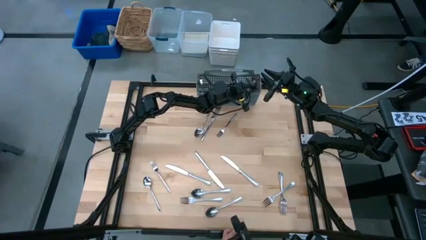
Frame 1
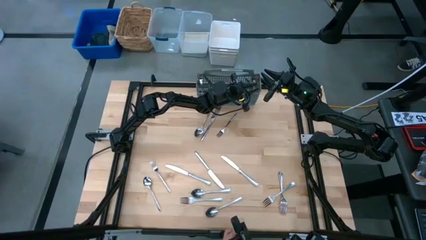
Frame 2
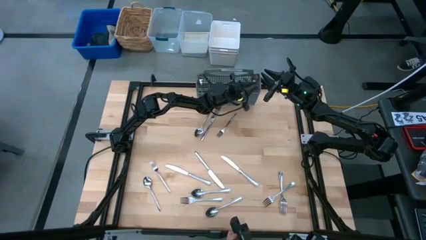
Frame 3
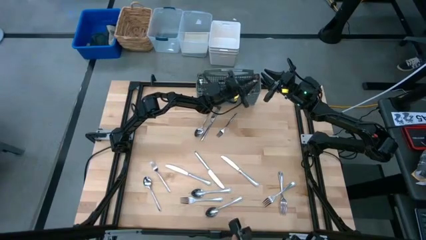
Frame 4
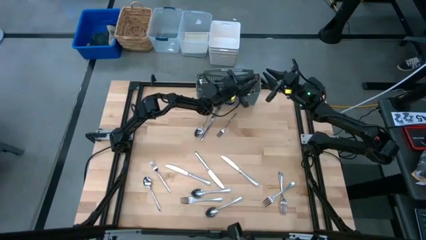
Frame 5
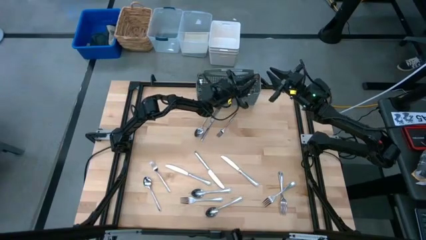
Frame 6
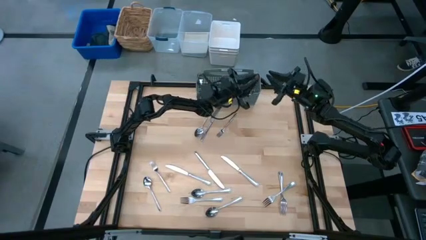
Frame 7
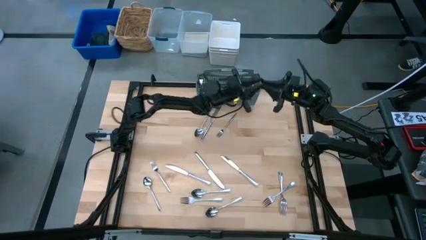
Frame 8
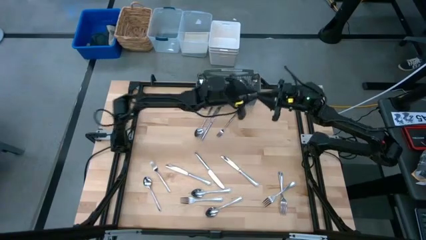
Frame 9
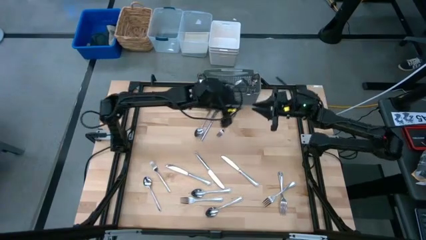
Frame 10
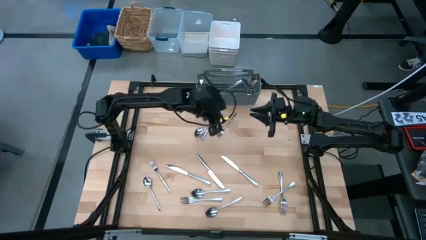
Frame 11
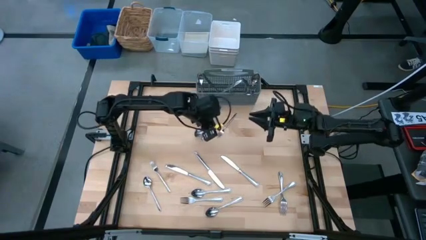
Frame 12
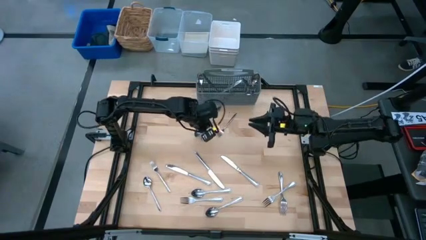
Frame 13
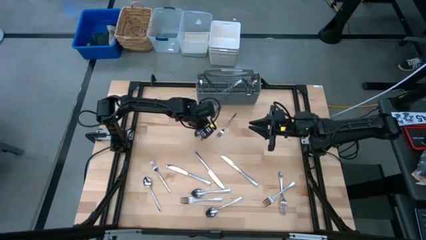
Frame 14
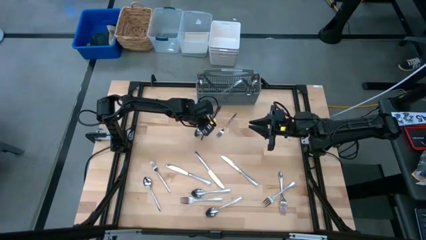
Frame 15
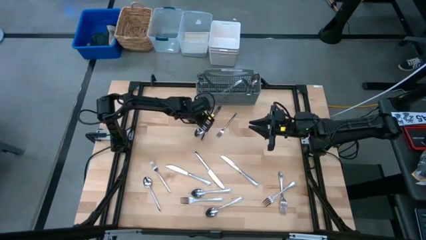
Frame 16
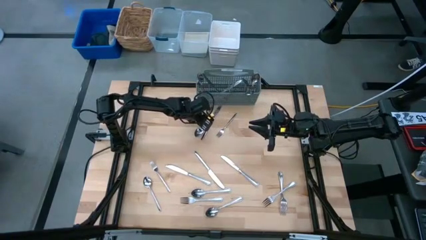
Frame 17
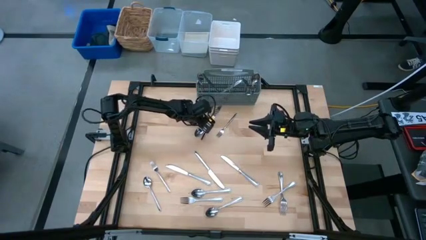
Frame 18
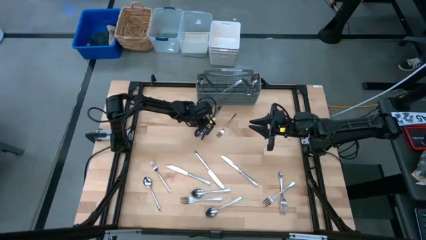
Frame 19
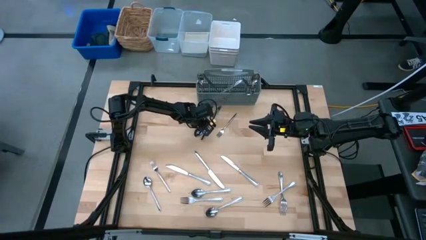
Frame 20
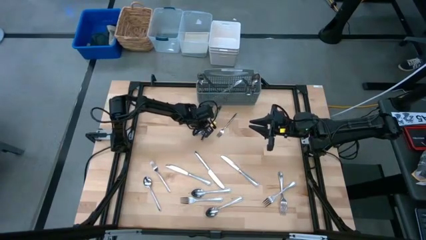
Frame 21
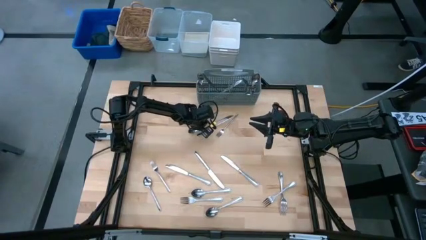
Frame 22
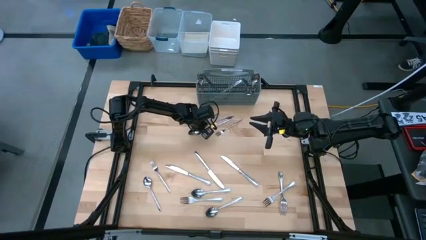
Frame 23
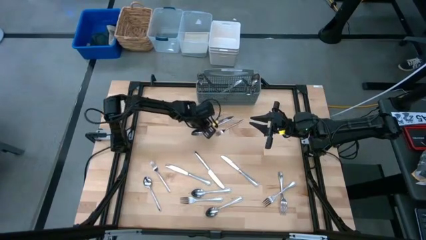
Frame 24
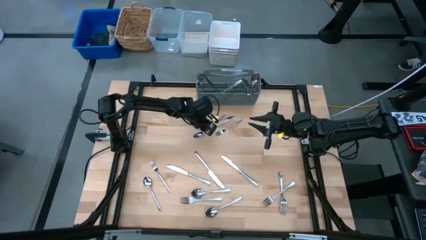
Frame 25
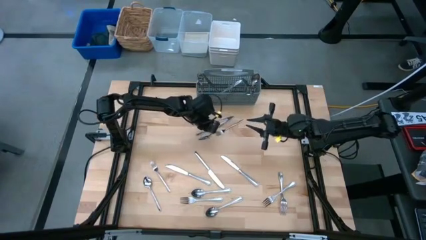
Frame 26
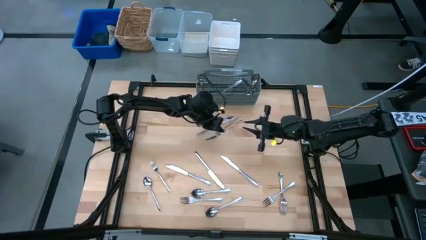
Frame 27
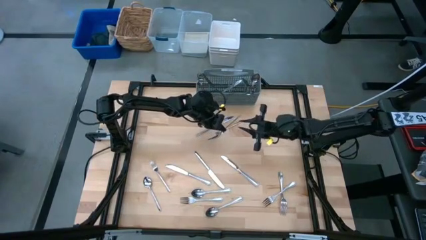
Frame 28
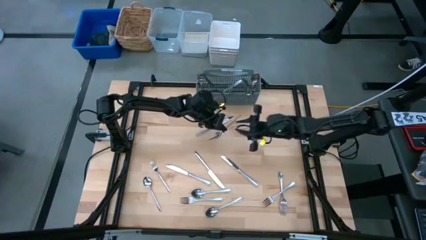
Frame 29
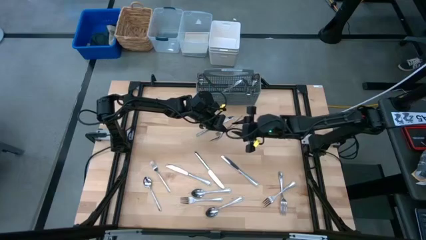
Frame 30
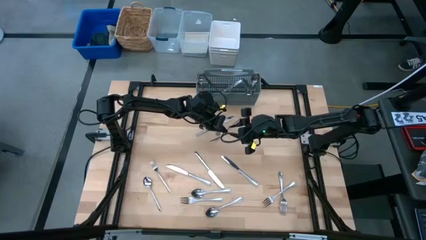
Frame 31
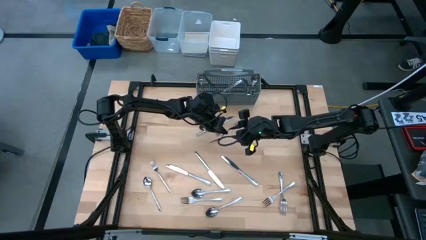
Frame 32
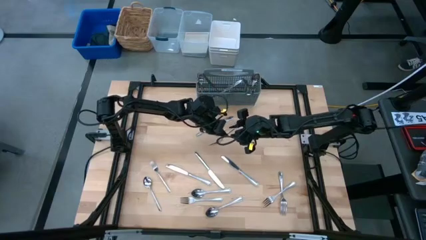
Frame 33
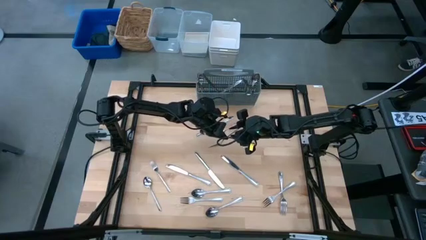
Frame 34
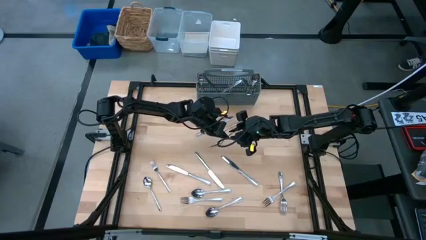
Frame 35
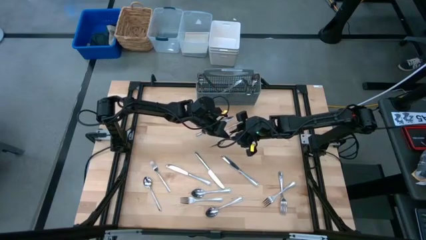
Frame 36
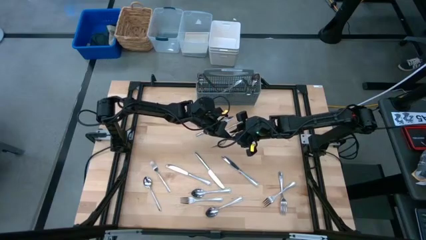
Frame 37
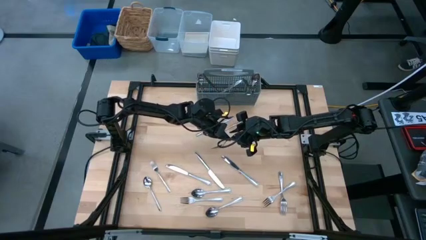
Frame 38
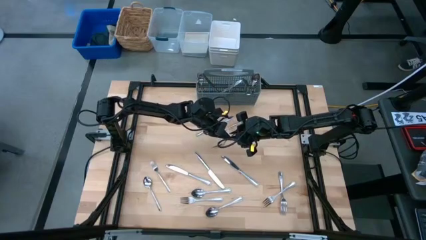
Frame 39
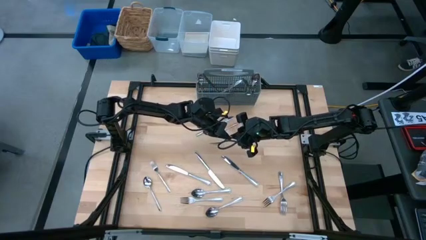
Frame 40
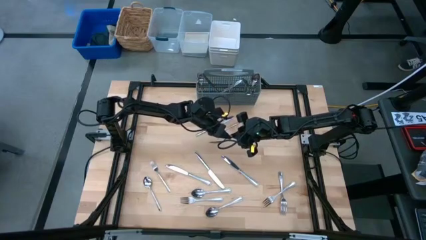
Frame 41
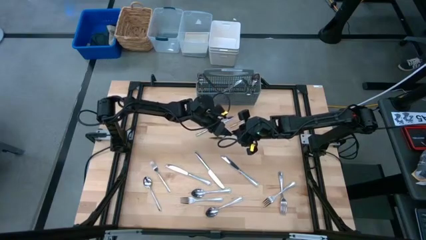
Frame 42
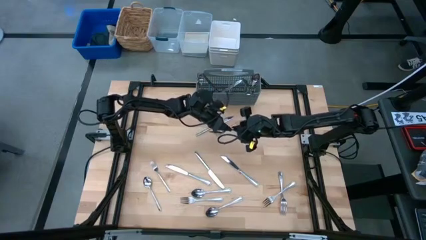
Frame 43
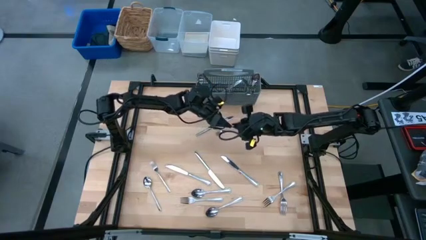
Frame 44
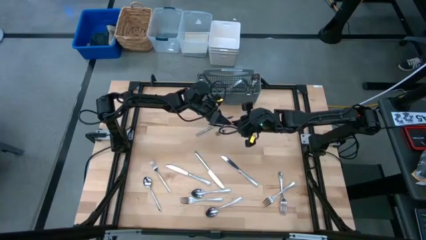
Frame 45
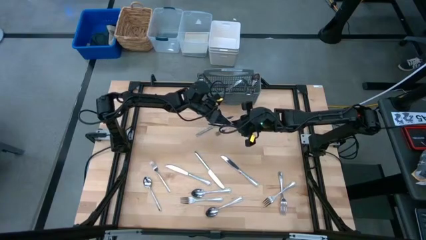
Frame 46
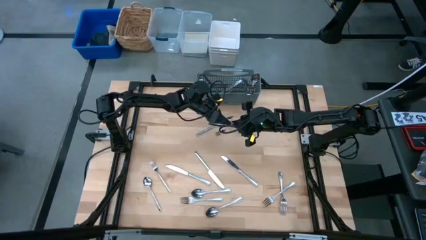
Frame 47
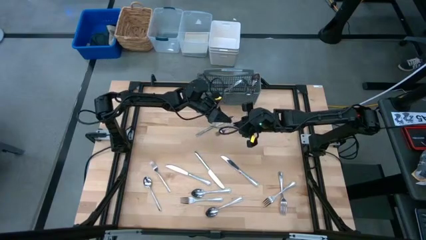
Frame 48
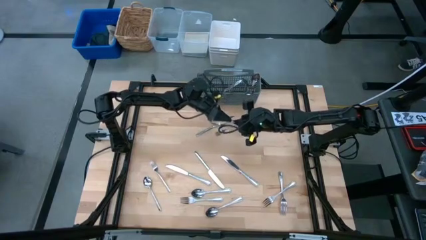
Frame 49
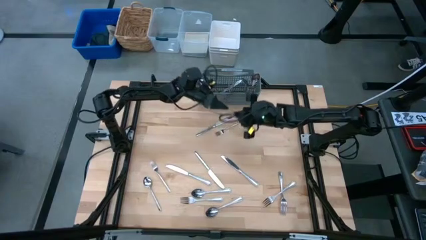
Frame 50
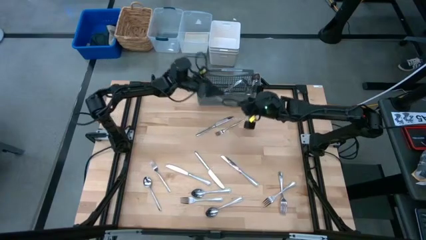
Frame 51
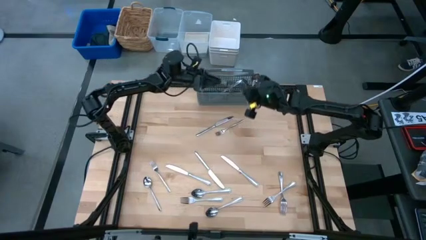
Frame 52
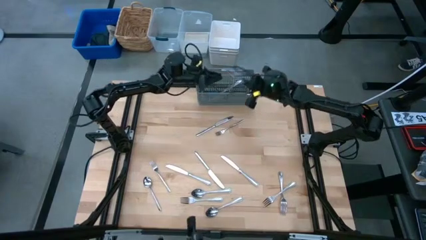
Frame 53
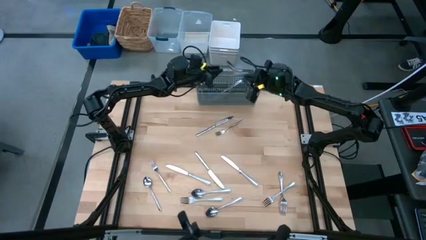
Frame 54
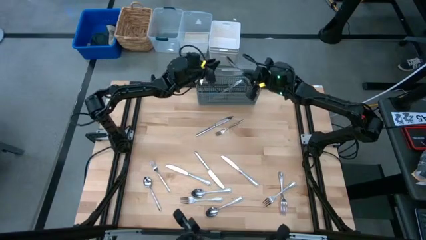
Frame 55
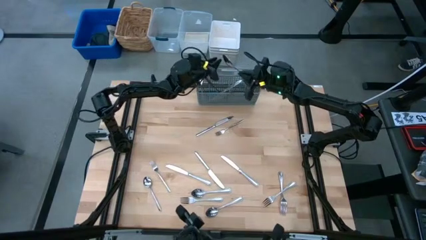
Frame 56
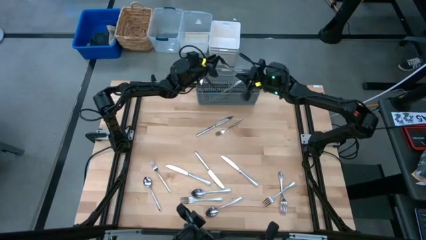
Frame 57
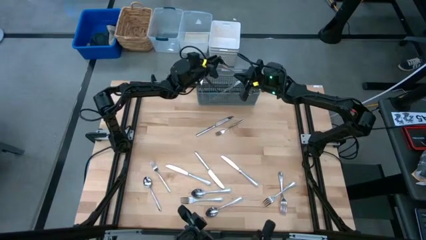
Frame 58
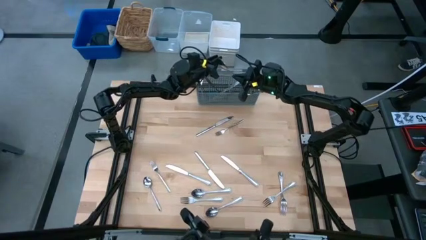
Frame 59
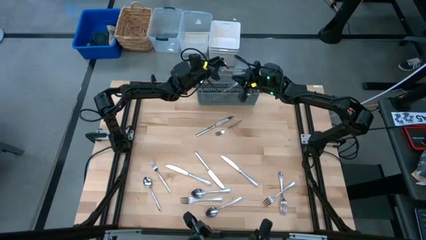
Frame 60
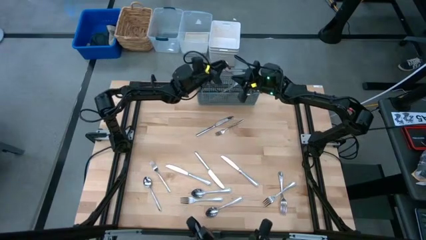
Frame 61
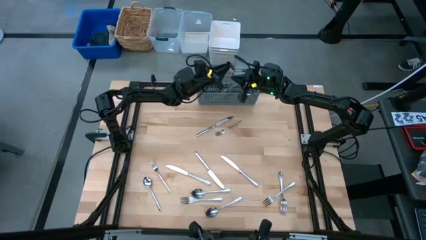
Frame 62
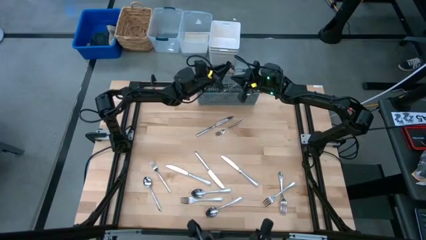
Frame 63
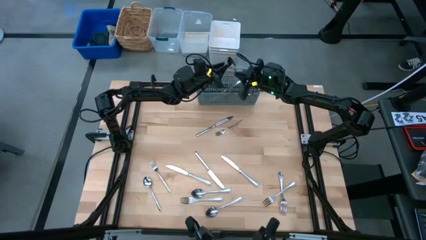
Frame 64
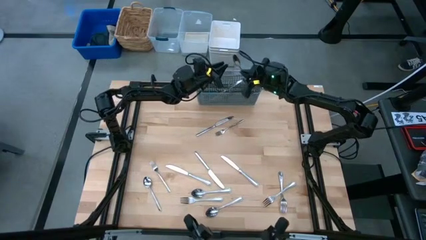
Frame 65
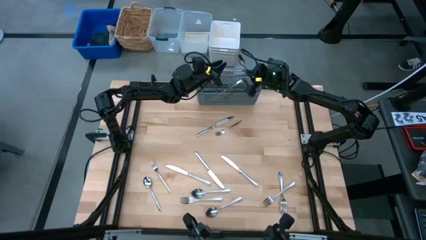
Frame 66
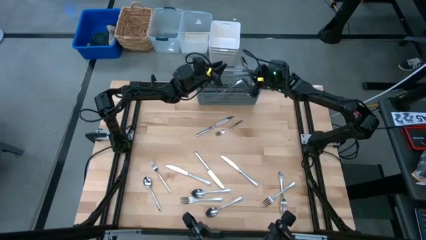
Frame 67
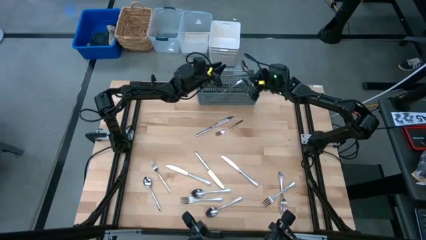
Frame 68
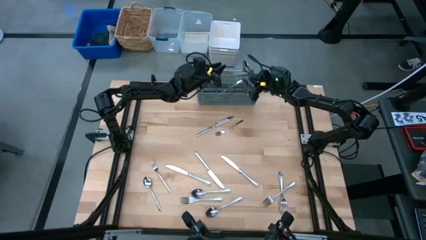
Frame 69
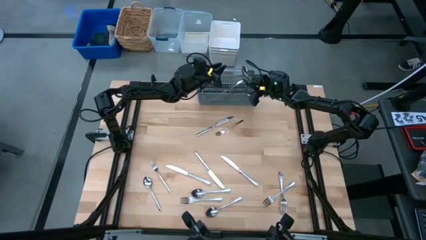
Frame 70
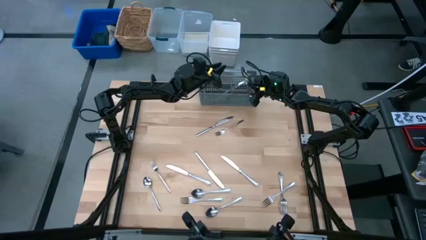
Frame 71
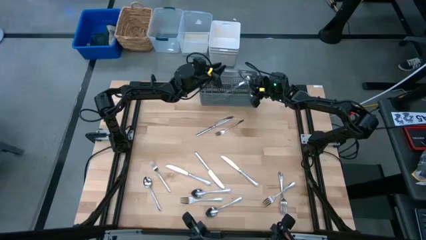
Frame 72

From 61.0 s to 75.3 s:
Put the silver spoon into the dishwasher utensil holder
